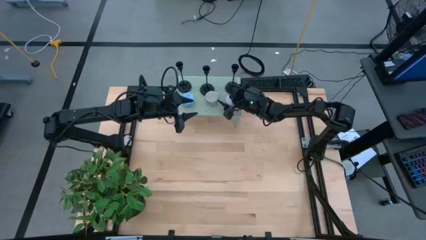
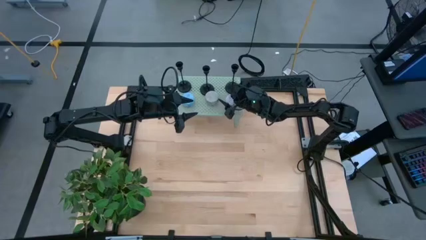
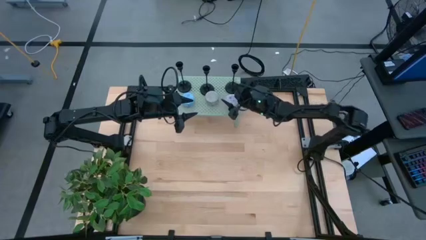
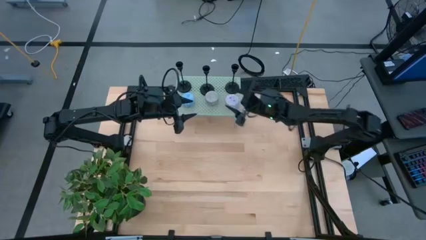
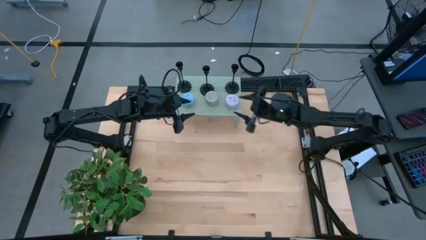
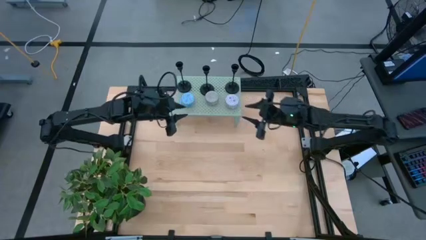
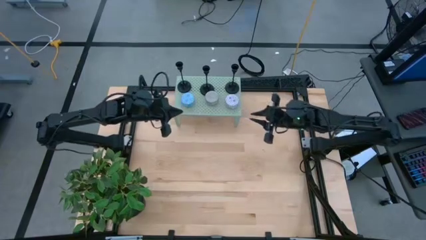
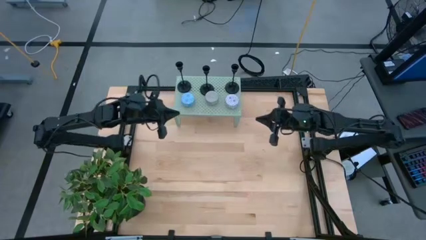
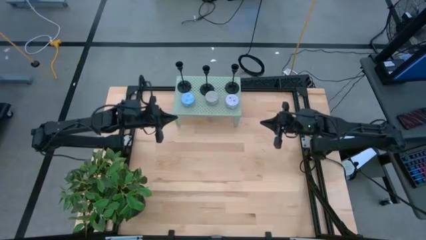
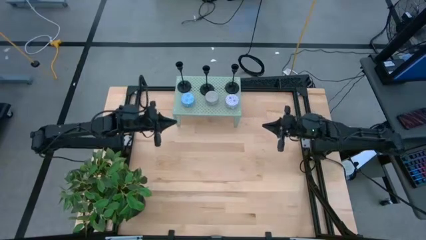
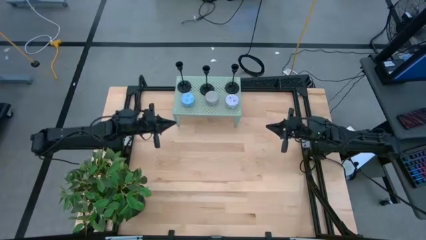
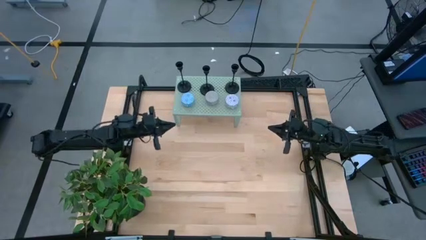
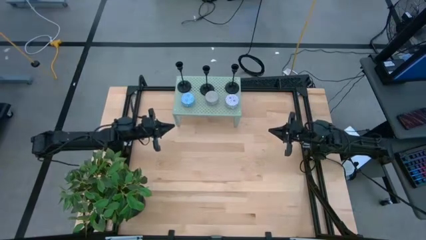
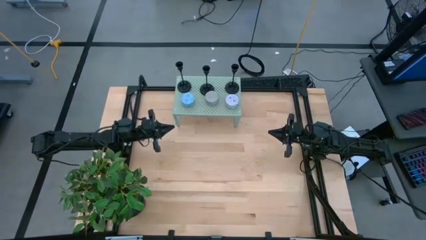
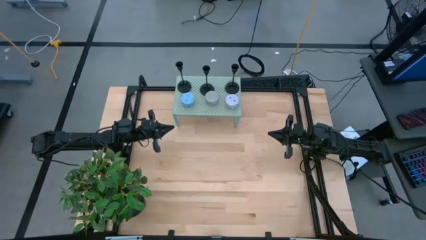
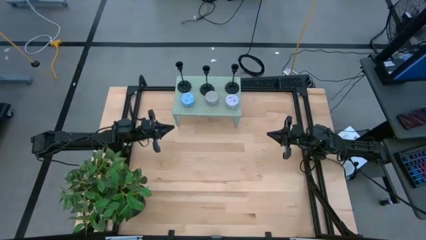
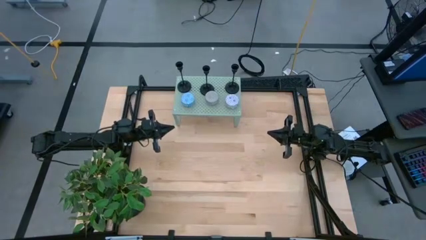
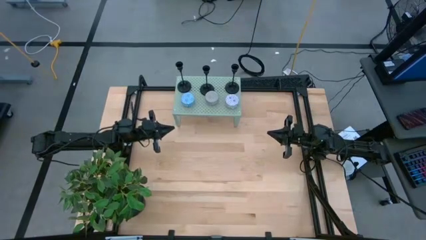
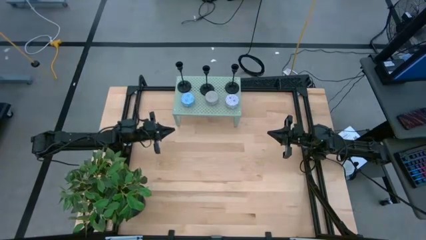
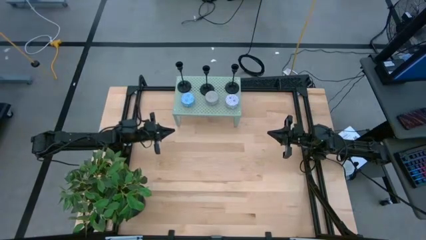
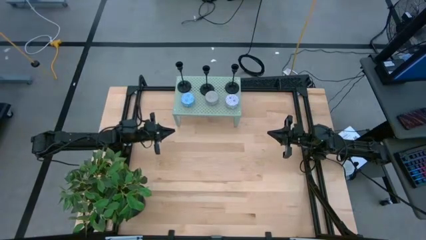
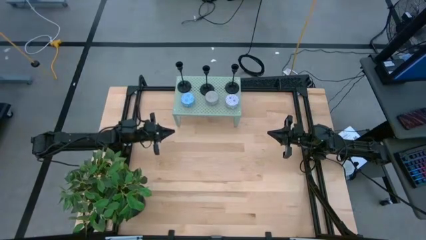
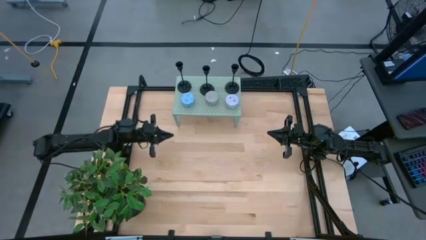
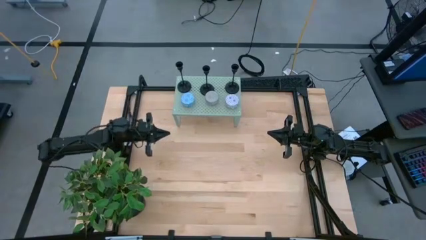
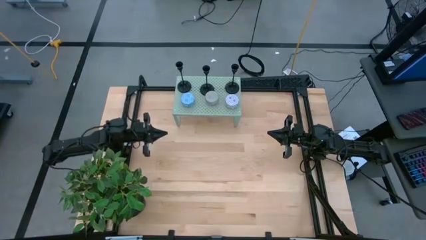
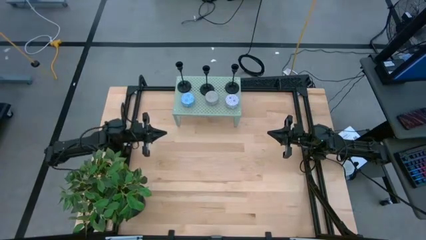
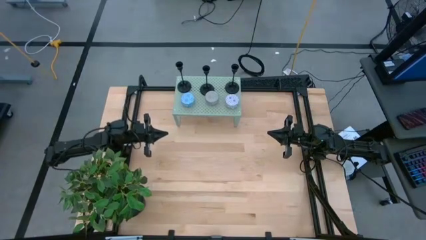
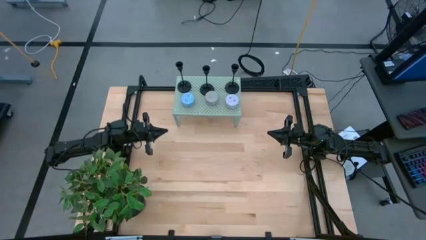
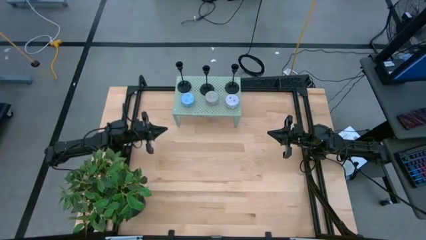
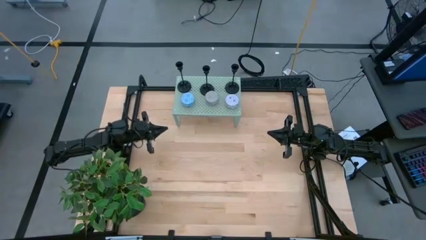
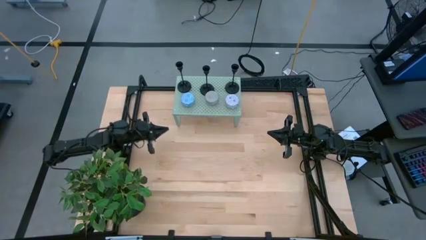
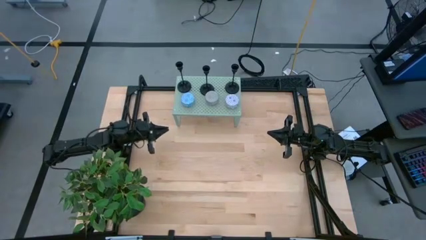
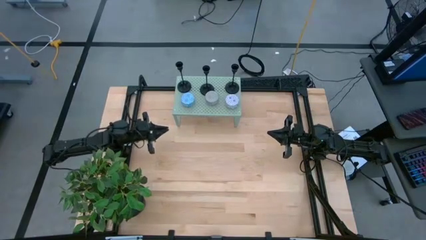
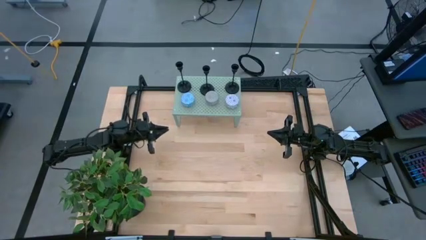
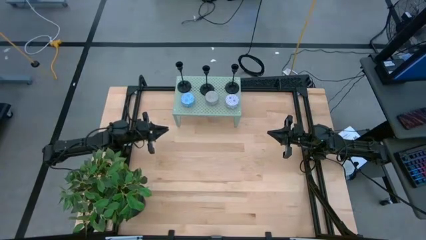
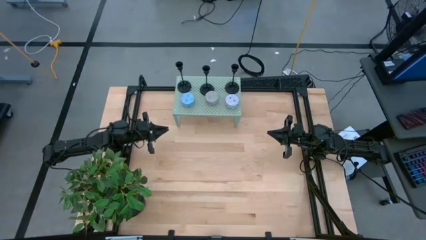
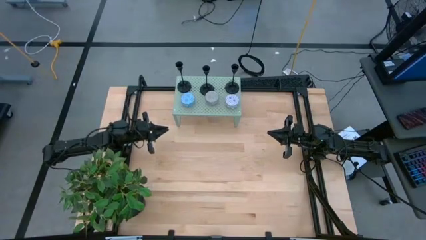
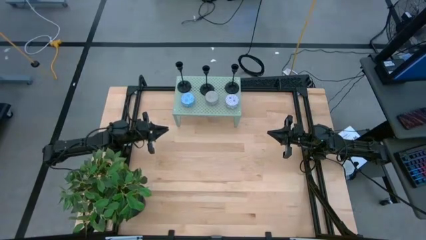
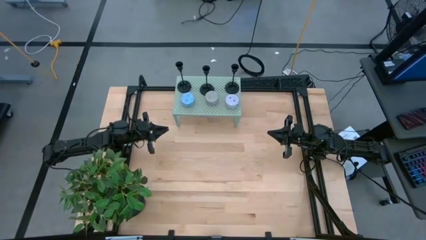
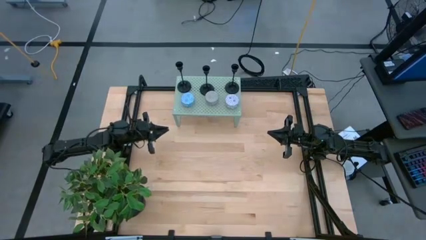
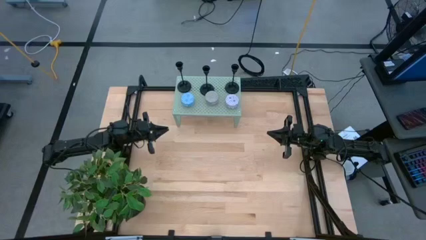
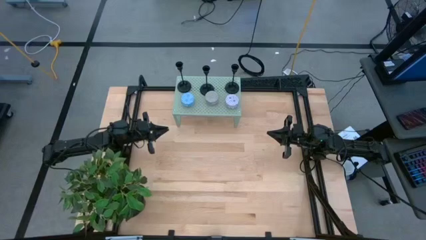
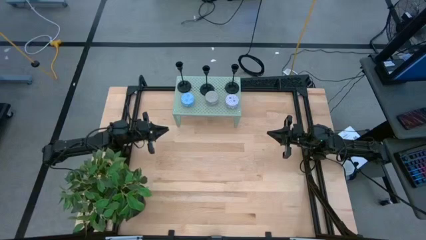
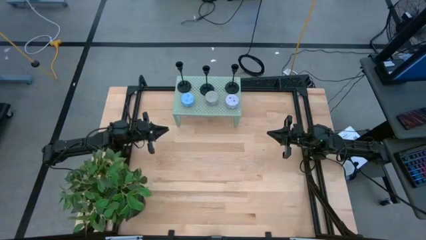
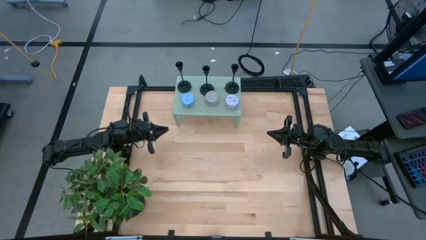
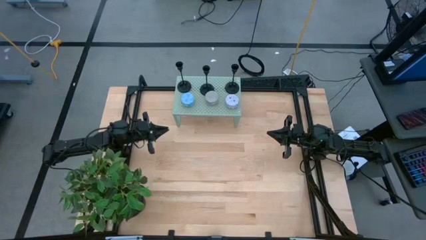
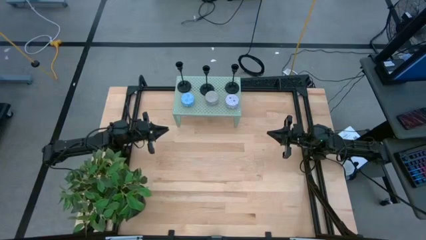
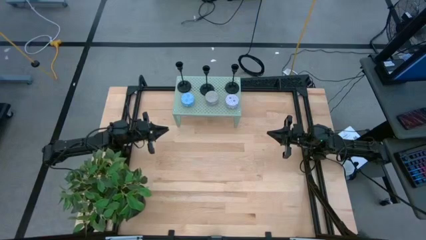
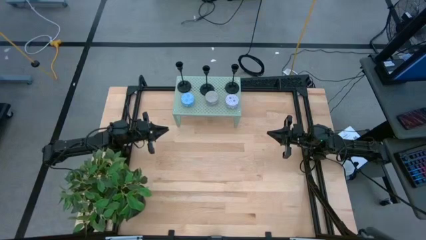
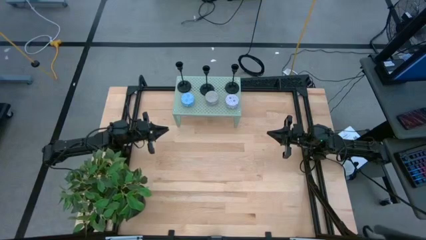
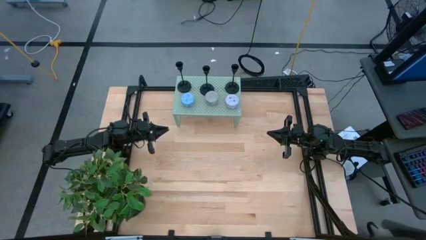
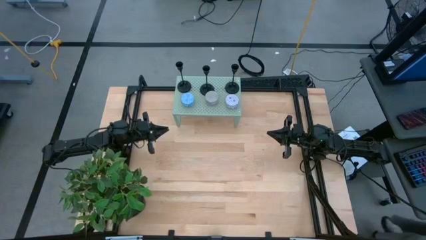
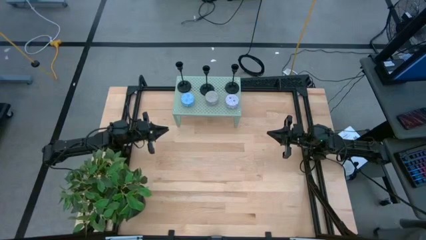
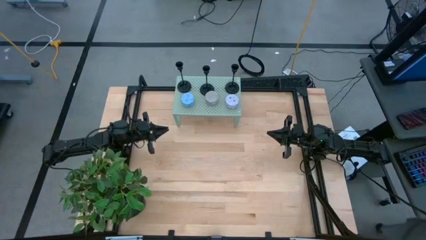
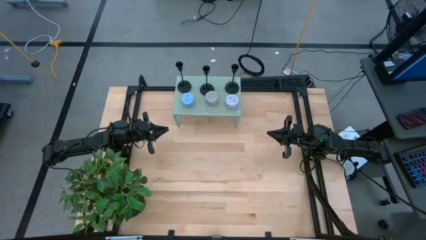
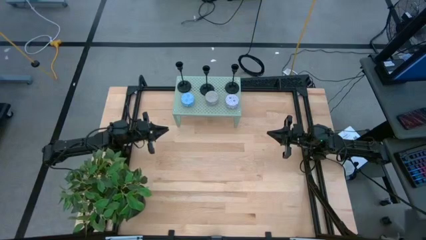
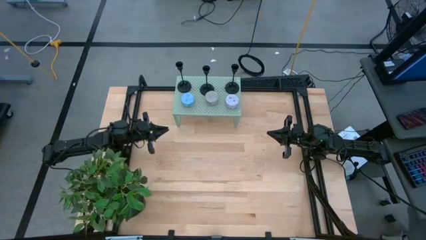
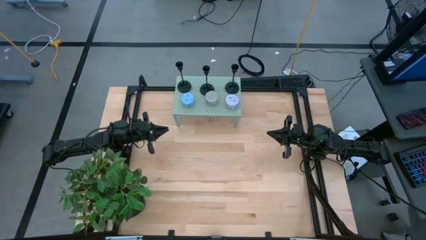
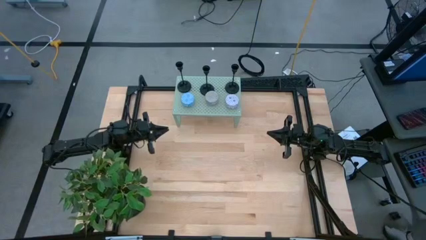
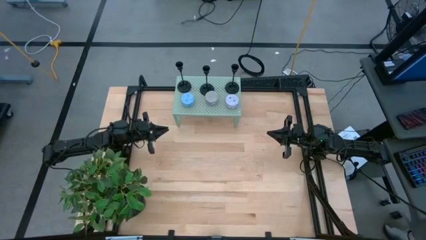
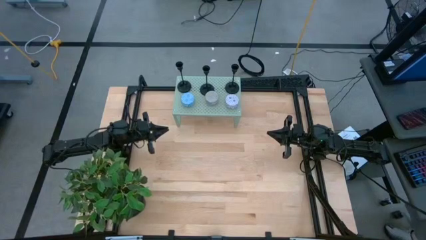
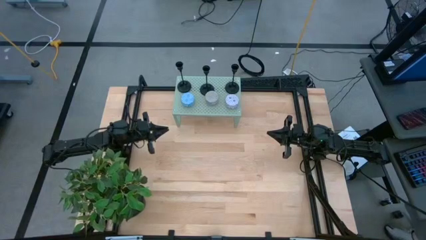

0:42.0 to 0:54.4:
Task: Pick & Place candle stick holders
Return to Home Position
